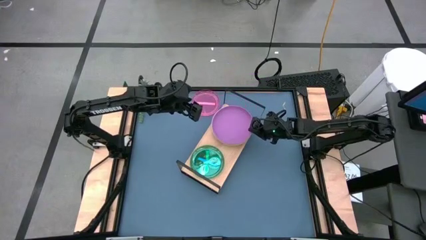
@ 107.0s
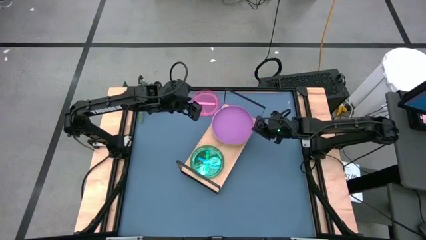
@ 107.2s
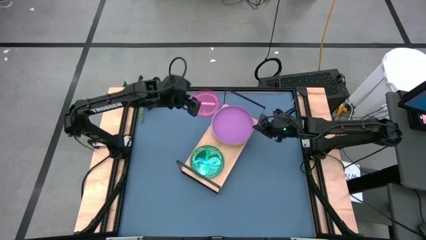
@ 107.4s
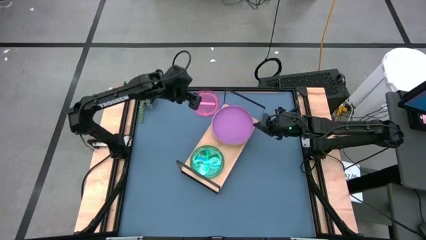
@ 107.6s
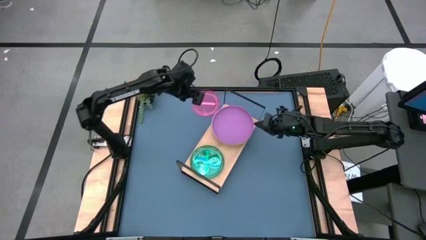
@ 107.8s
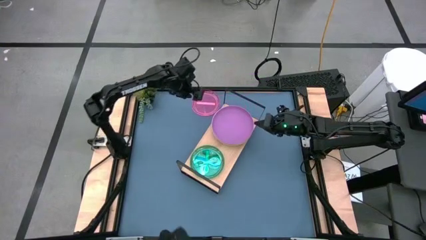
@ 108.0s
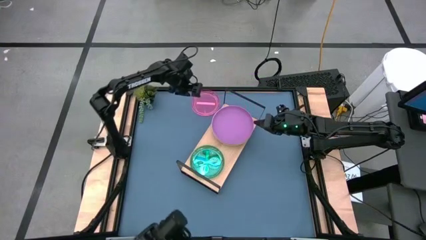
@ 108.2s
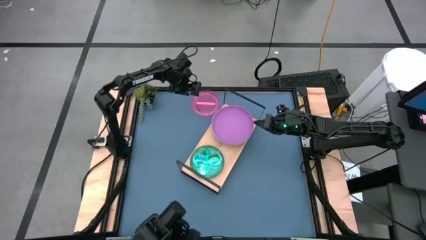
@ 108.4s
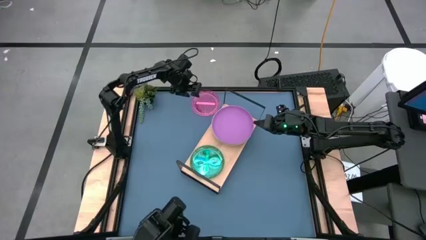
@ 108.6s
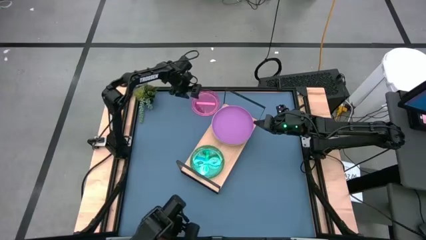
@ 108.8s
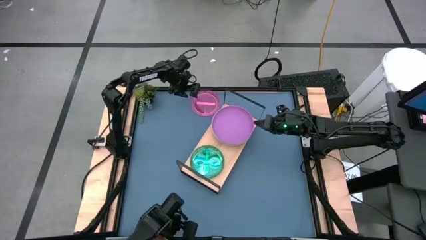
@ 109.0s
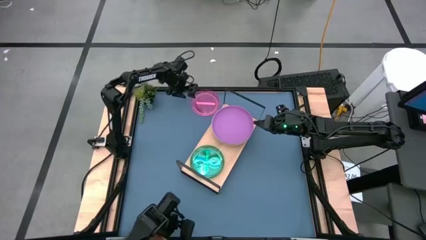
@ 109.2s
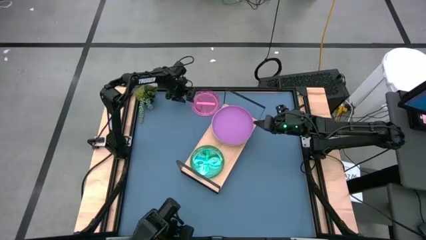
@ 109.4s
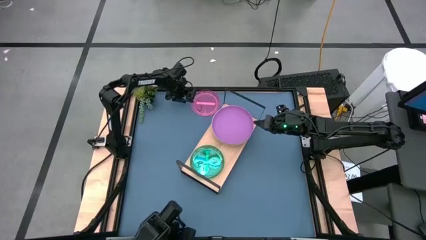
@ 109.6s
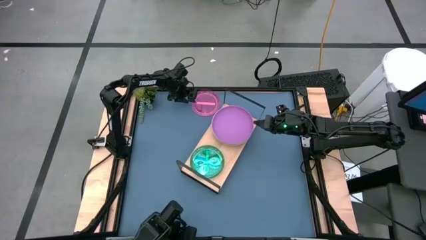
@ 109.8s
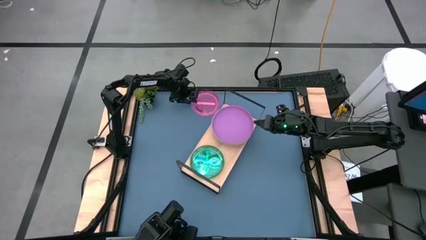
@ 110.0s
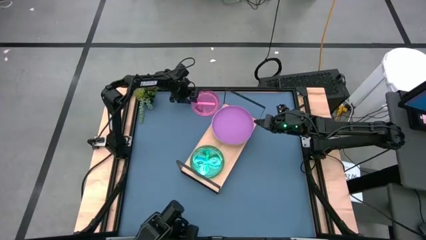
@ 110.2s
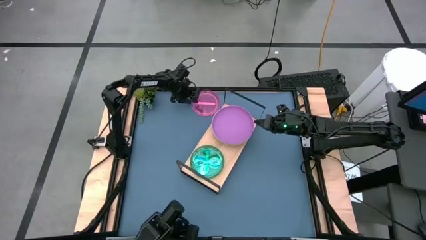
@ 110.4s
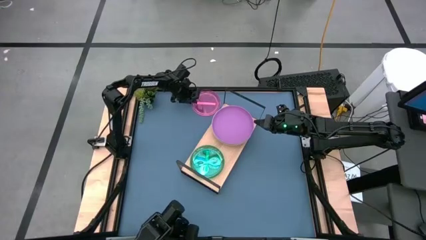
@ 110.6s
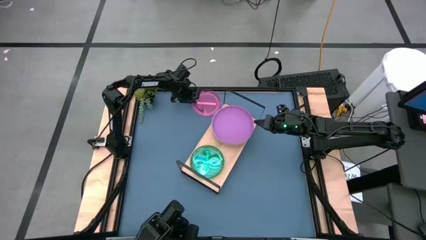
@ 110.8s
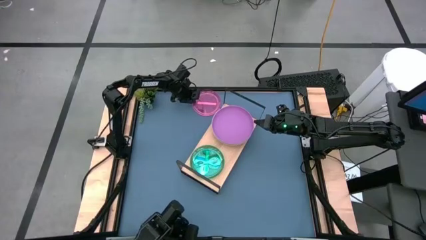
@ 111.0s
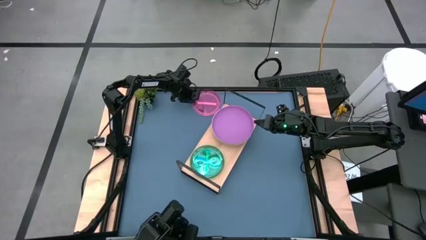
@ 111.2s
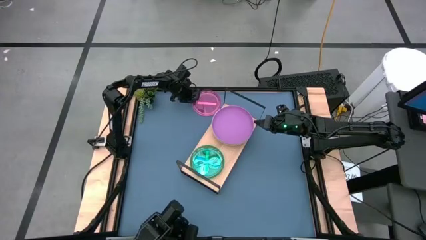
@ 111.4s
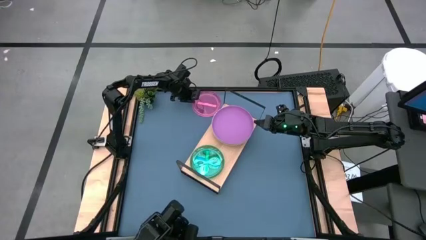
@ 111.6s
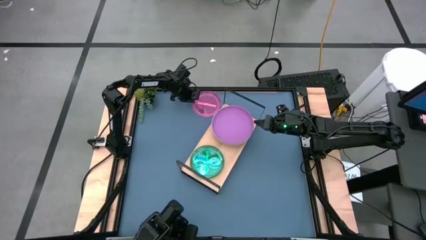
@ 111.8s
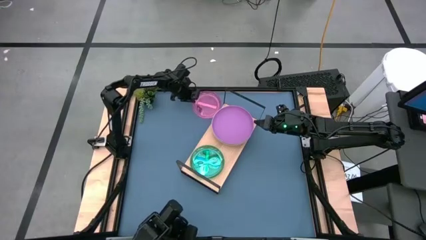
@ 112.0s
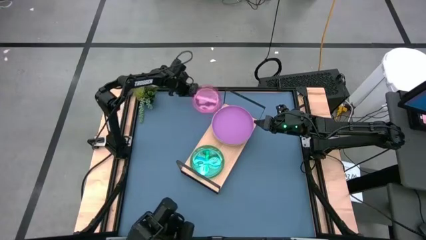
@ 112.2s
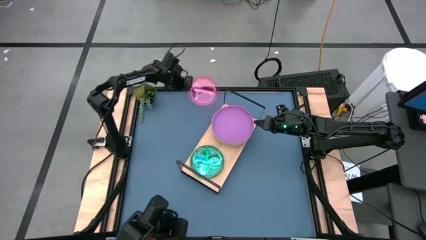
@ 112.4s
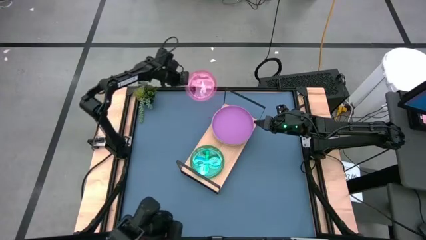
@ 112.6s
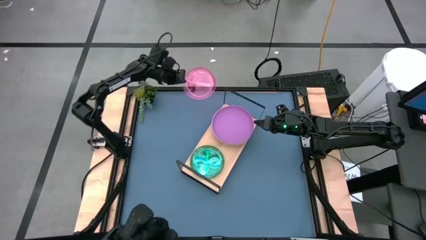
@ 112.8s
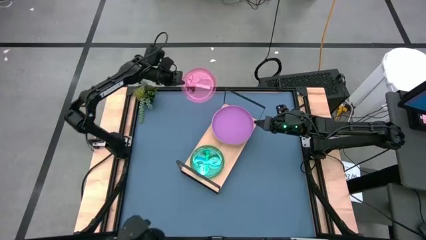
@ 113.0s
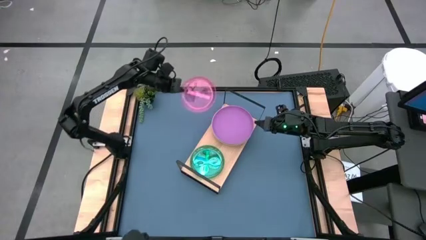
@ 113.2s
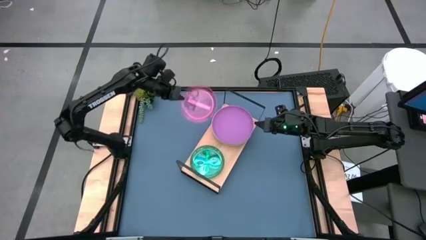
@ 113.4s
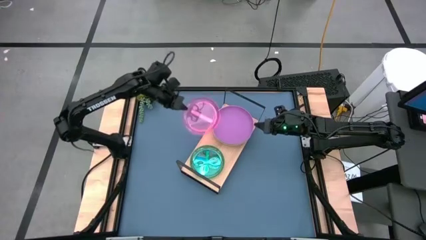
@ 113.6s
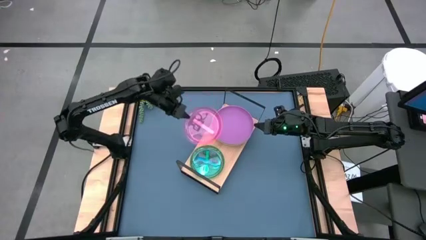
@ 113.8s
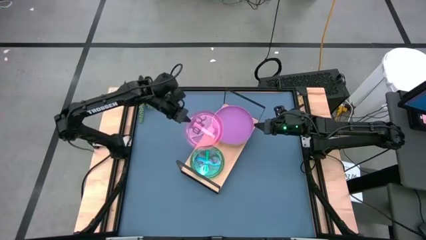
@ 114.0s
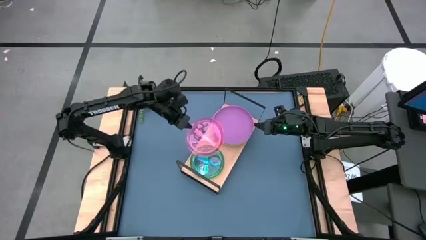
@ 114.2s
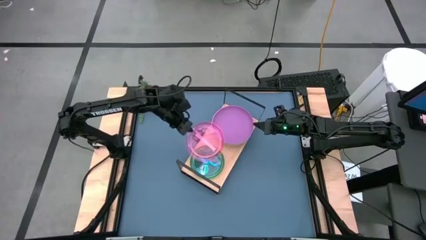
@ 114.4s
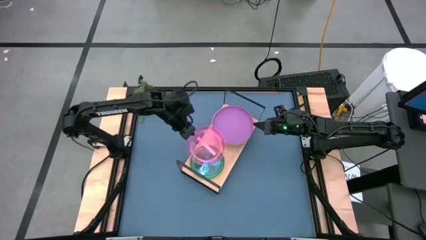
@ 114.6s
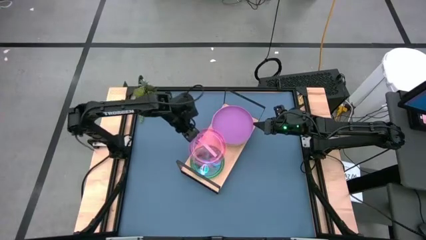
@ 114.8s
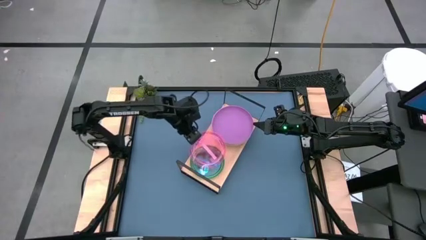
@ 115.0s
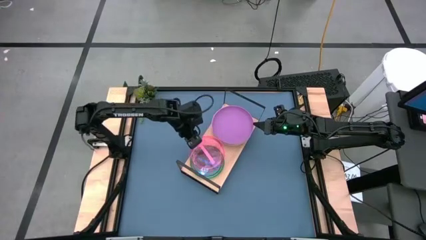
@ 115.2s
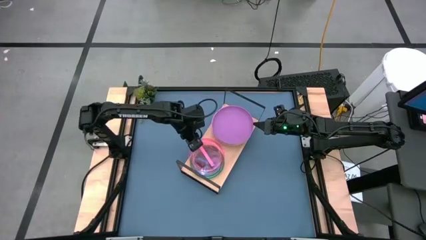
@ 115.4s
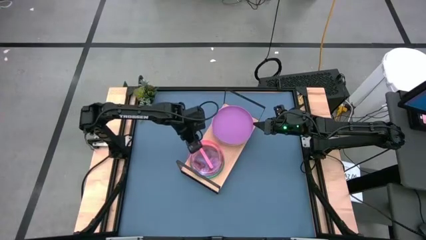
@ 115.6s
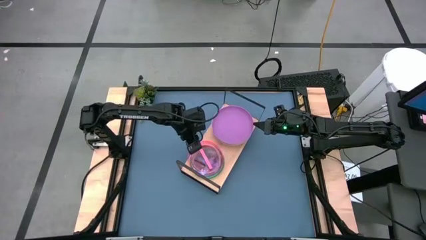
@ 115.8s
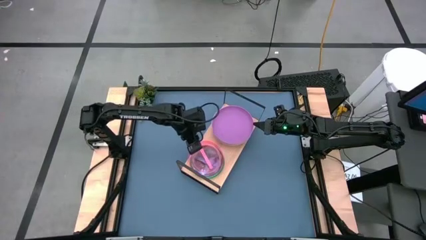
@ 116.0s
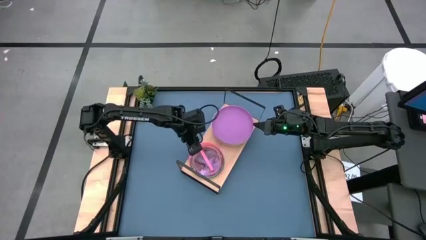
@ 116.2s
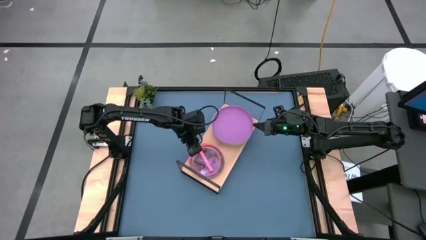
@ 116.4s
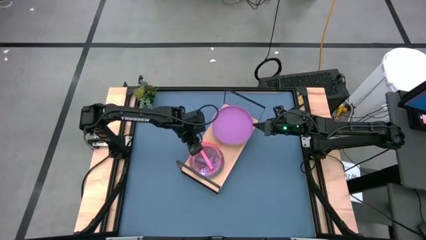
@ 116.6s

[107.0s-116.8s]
Task: Place and stack plates onto a shelf
Stack the pink plate on top of the blue plate on the shelf
